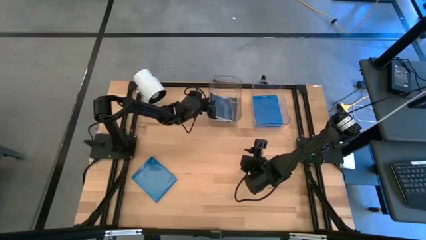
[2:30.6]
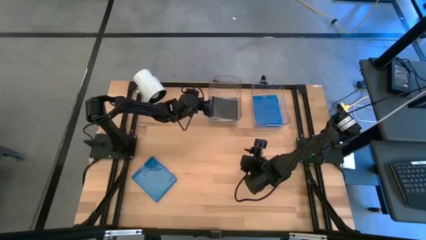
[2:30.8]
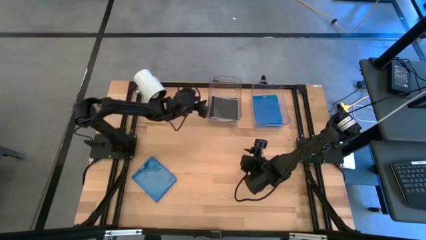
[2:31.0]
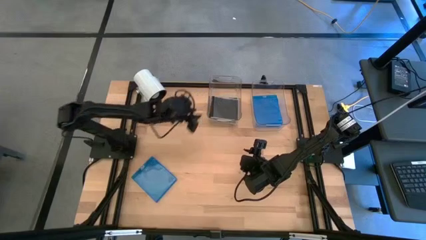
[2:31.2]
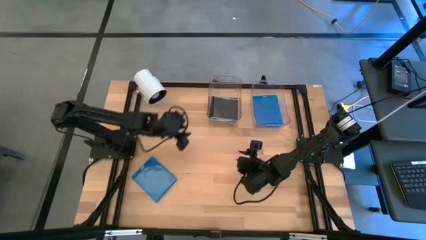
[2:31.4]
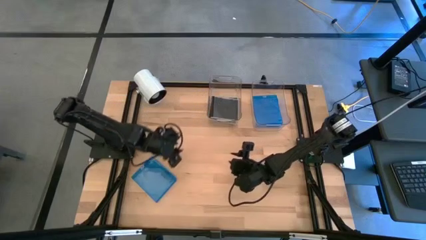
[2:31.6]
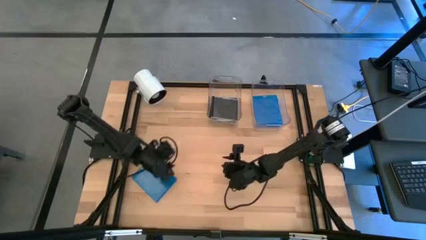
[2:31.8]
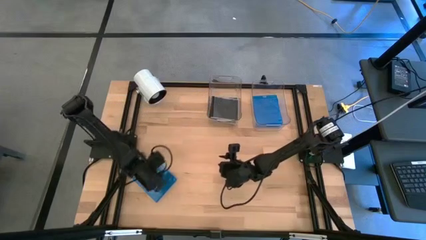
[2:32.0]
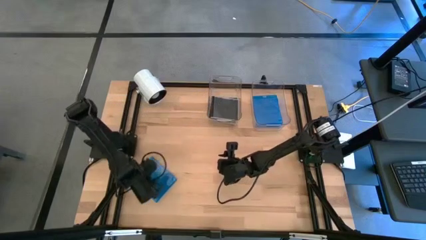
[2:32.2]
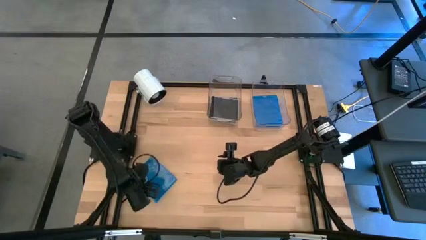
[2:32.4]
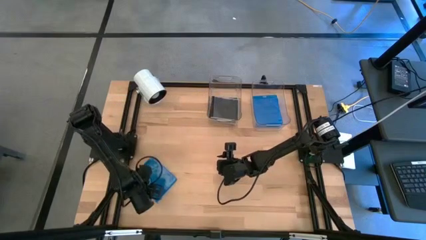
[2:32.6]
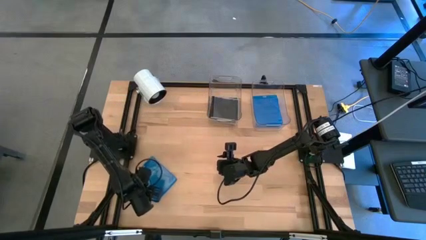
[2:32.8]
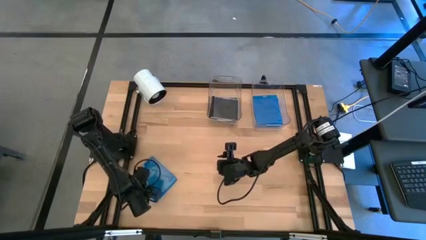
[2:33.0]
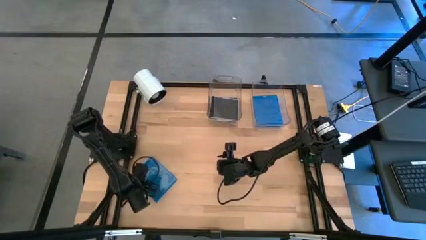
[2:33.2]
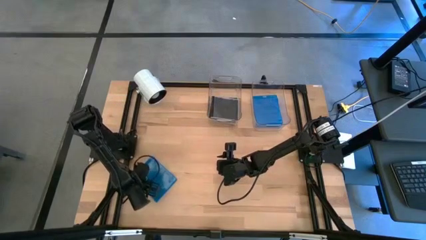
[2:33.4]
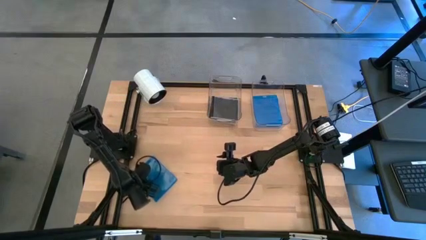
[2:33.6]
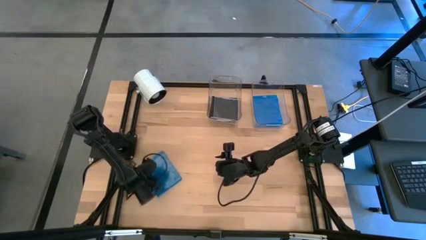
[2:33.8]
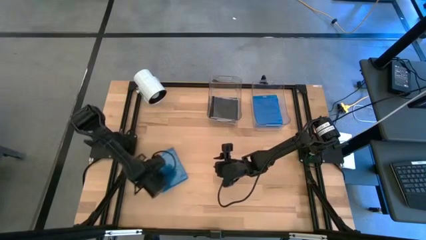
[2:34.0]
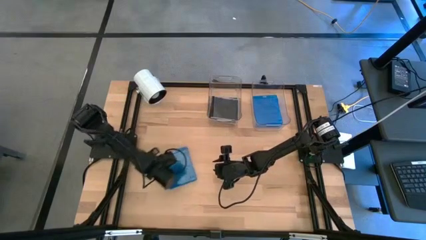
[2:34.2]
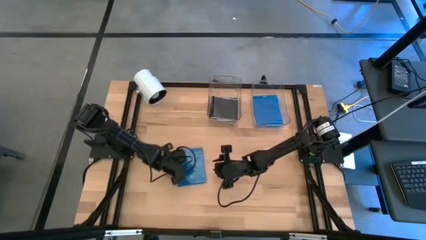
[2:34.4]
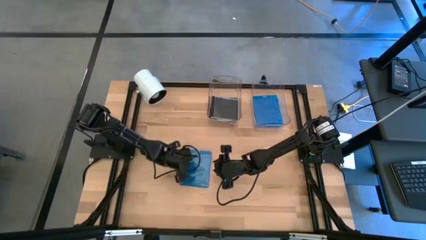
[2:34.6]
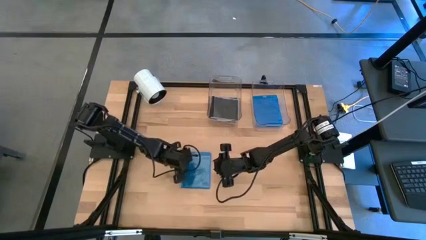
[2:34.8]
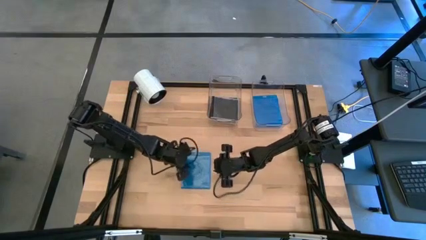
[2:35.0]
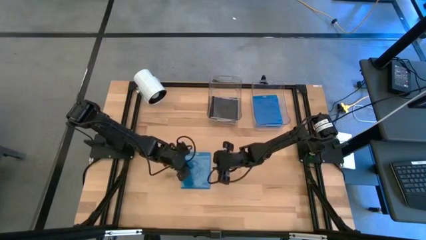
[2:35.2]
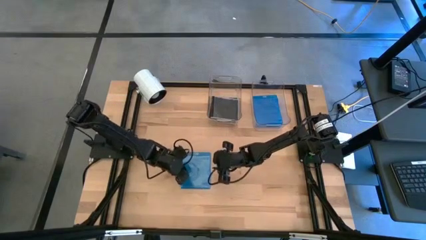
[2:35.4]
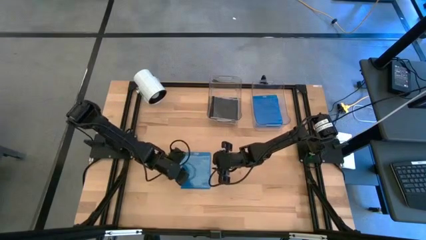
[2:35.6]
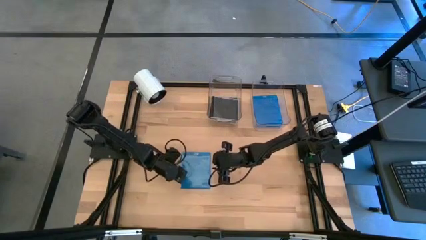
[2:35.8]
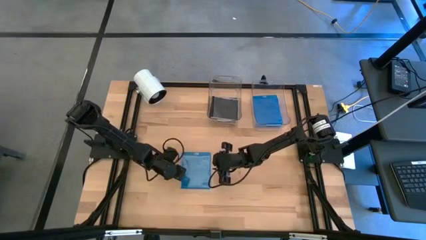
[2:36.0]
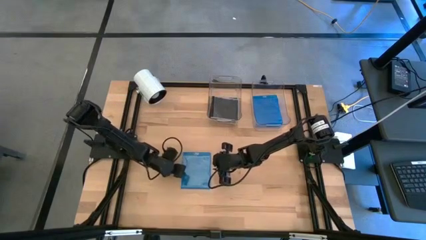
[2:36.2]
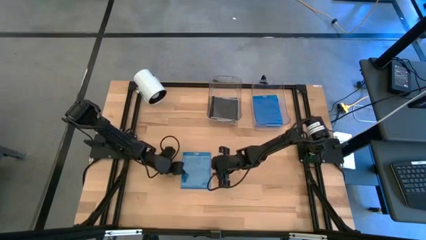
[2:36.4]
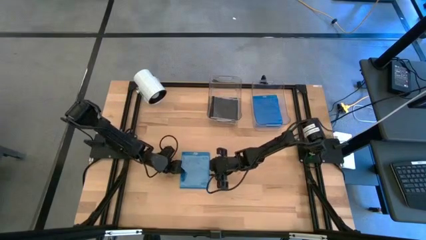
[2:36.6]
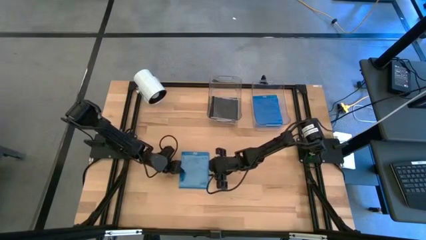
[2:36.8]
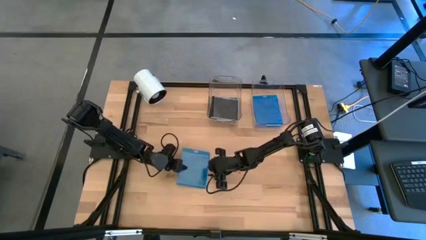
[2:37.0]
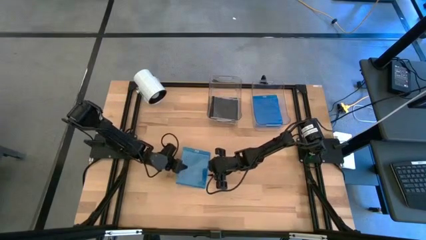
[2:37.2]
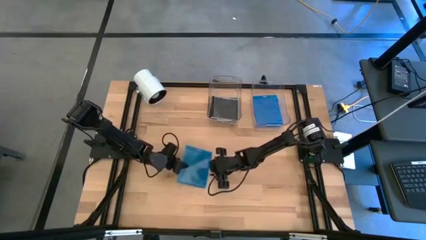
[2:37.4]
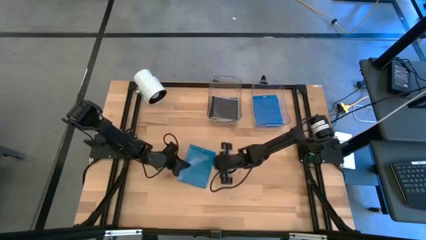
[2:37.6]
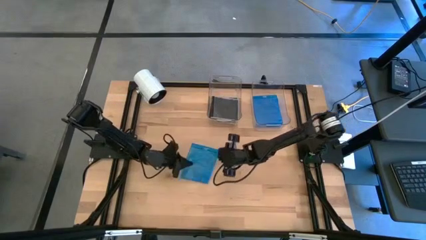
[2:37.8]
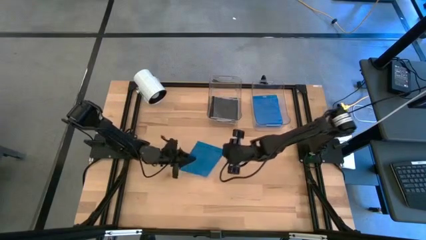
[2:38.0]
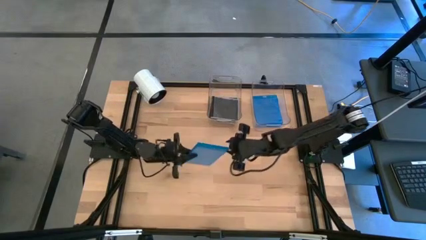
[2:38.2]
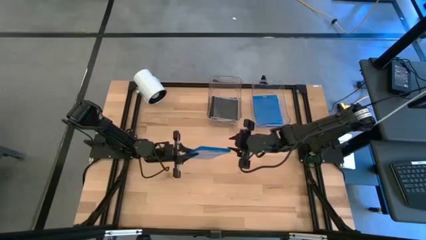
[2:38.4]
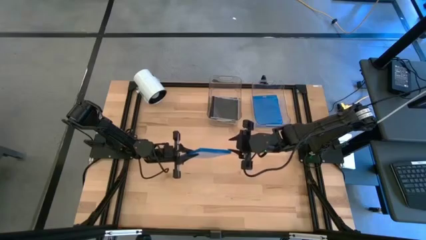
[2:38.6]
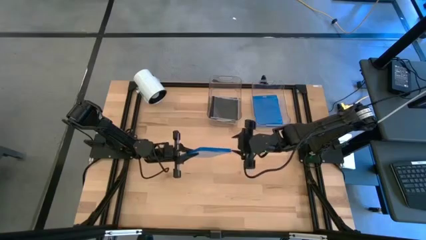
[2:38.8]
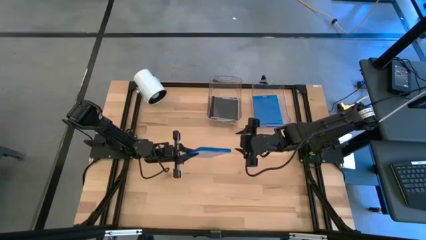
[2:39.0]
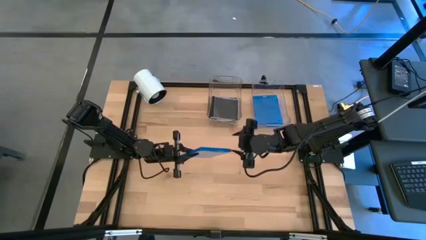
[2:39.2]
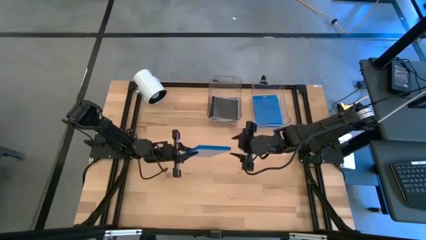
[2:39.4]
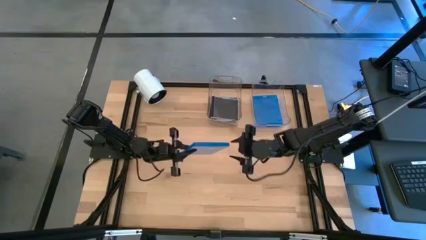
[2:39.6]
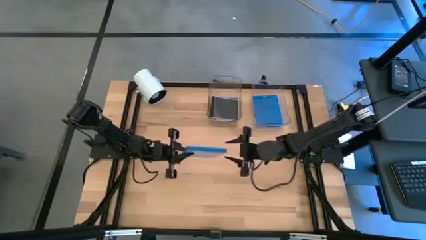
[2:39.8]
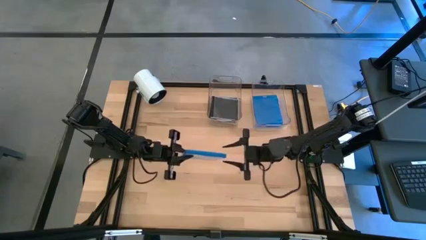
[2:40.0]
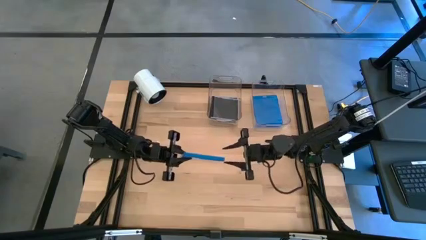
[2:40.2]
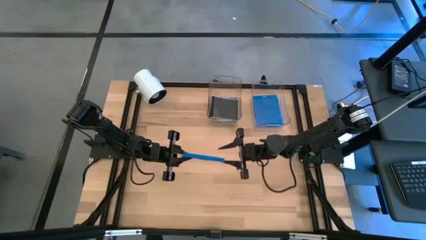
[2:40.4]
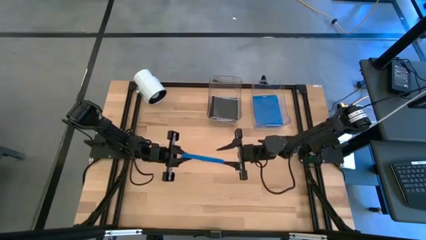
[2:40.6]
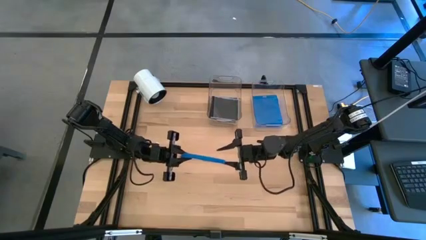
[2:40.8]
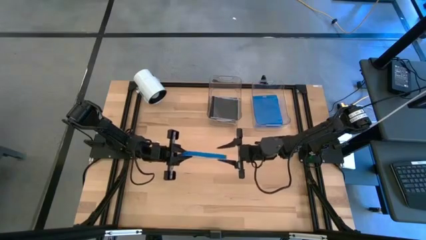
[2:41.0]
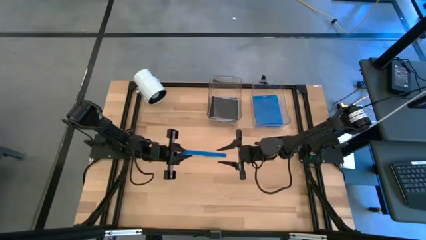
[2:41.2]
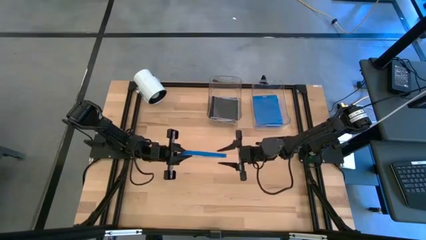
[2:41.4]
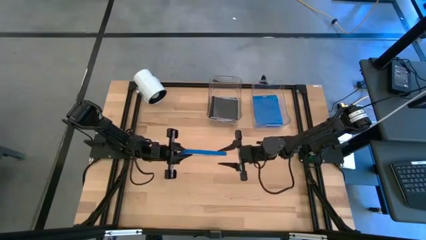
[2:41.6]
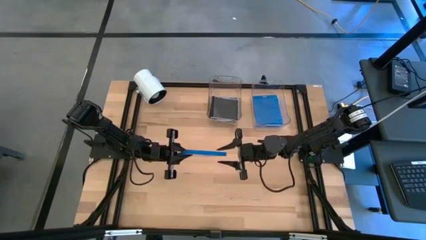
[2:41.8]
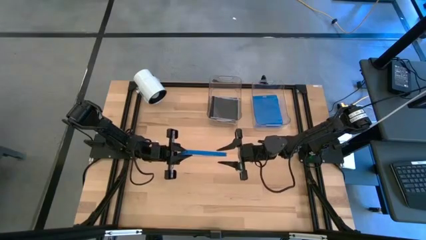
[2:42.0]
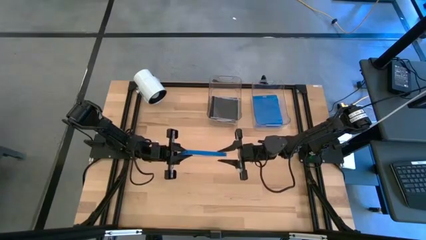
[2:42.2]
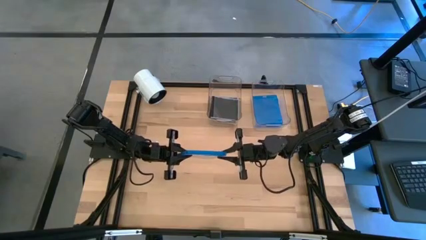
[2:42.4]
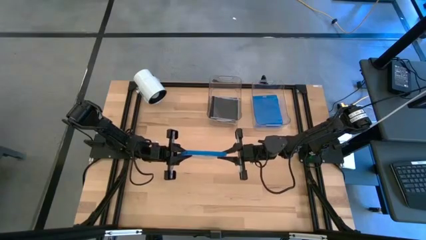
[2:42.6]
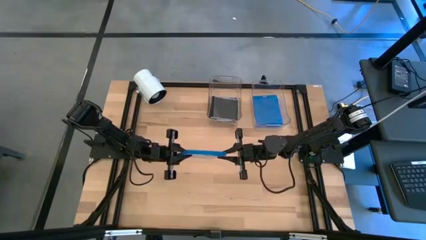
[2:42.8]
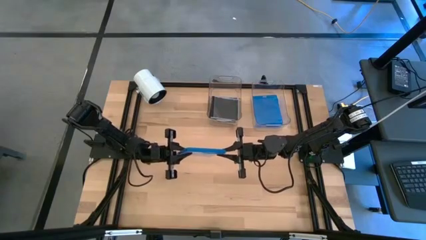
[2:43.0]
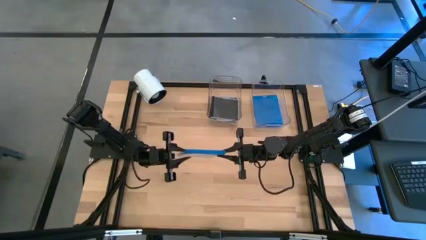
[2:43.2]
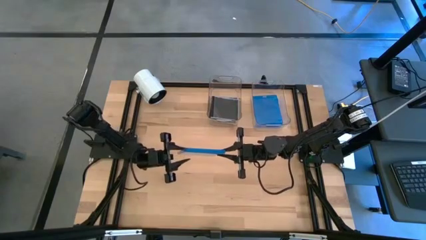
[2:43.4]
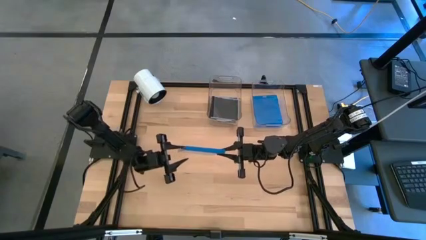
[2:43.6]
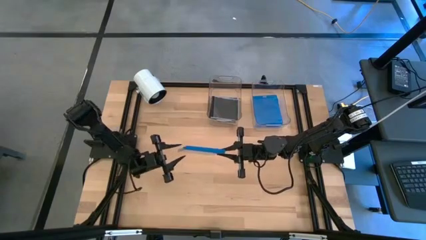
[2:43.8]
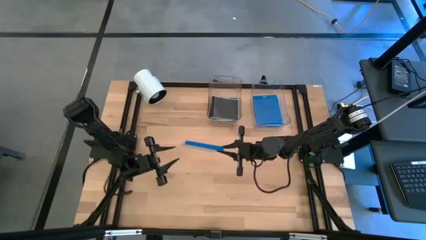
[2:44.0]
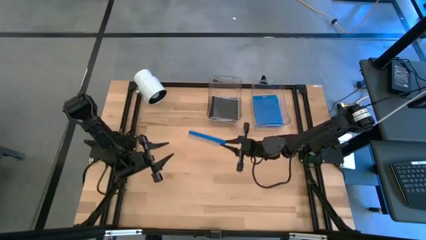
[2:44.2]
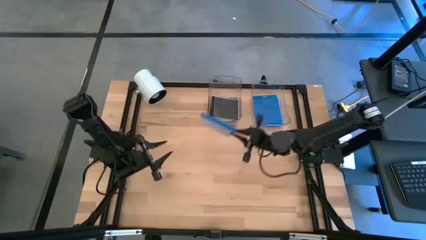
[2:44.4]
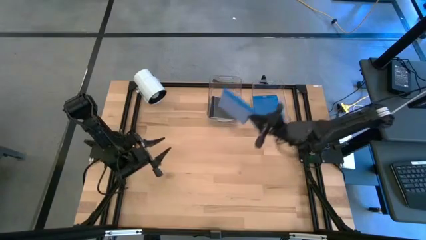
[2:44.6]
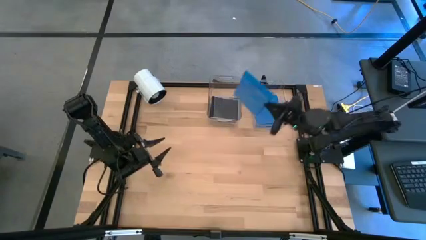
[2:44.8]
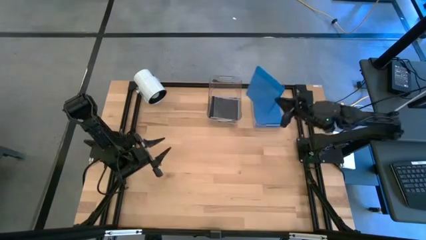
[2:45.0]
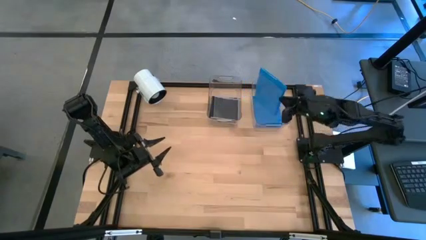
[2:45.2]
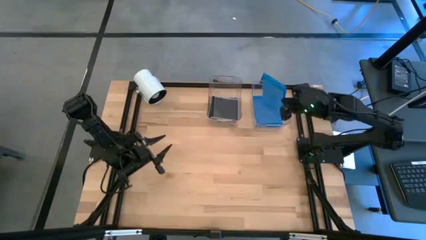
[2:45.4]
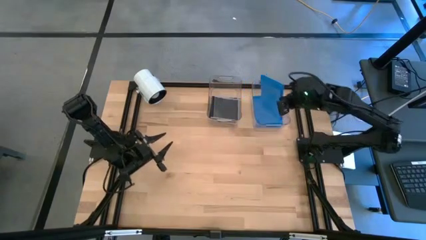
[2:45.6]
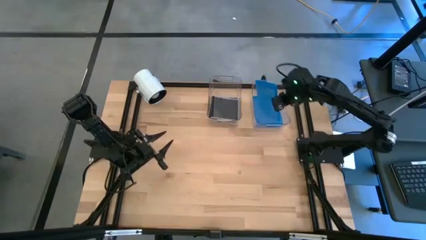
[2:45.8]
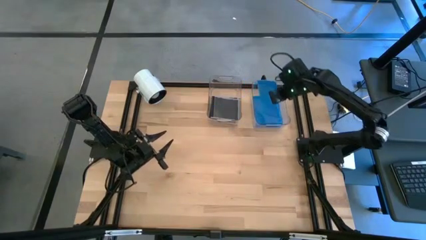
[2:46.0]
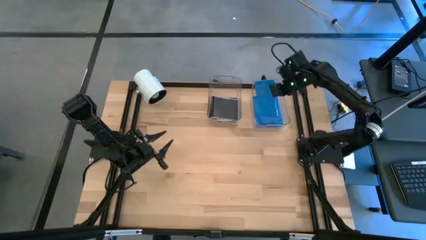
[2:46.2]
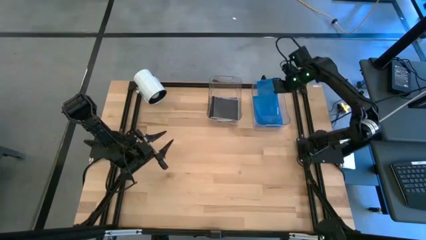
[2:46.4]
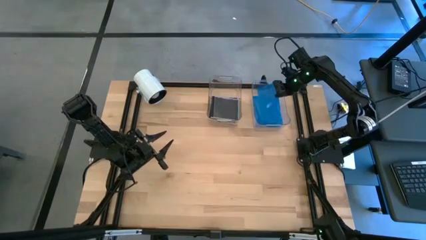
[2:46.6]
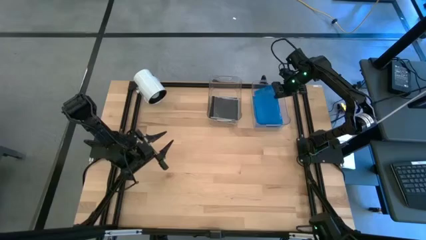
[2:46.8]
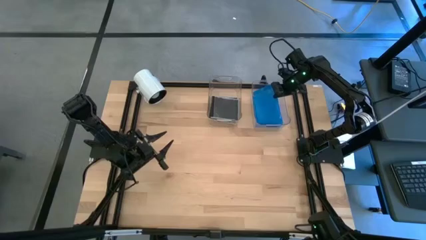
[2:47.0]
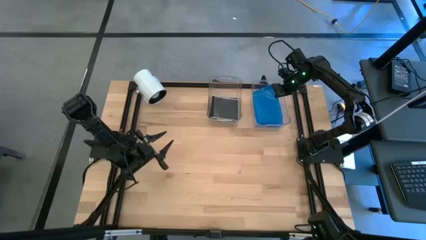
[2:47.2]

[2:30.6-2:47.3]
Task: Pick & place jewel cases by type
Put the blue CD case into the right transparent bin
